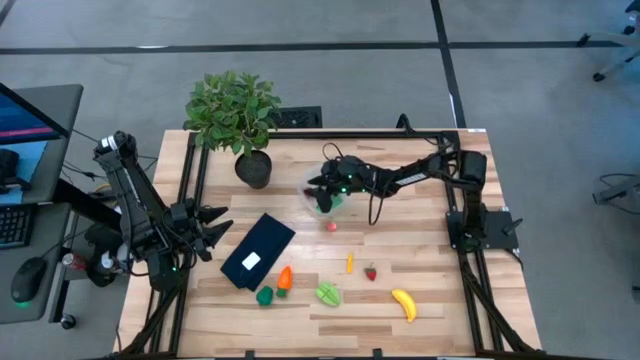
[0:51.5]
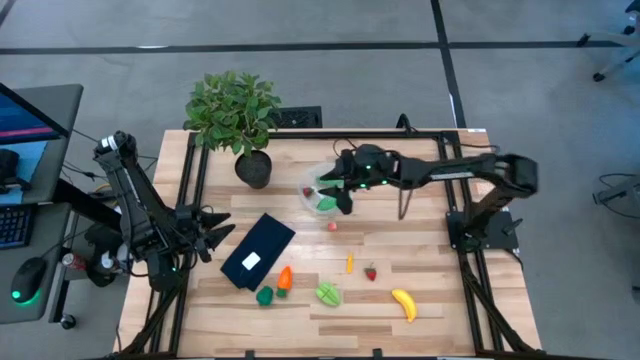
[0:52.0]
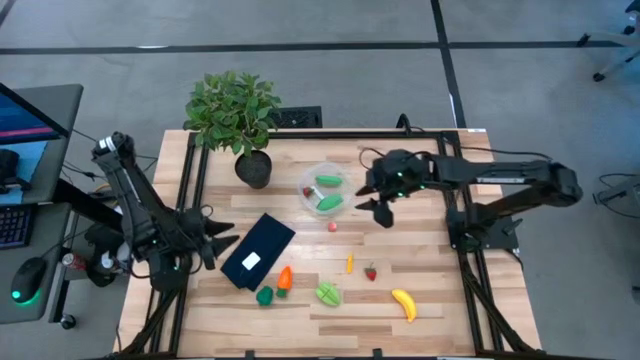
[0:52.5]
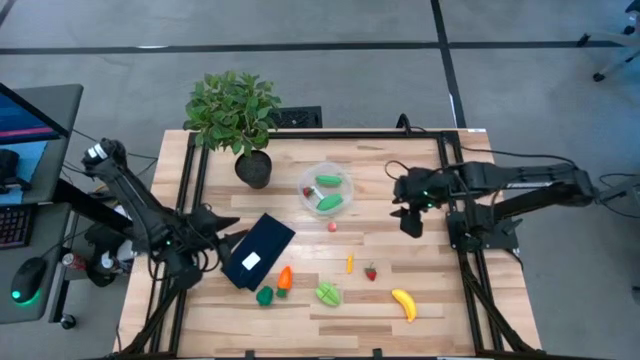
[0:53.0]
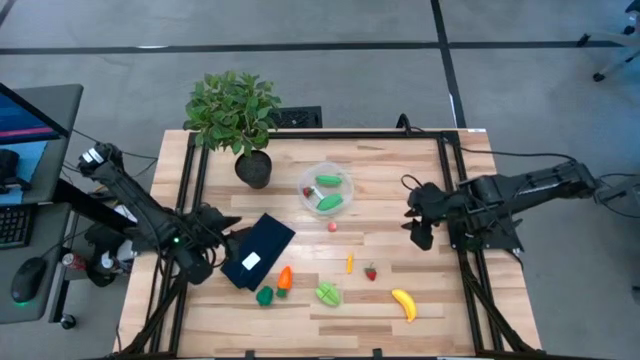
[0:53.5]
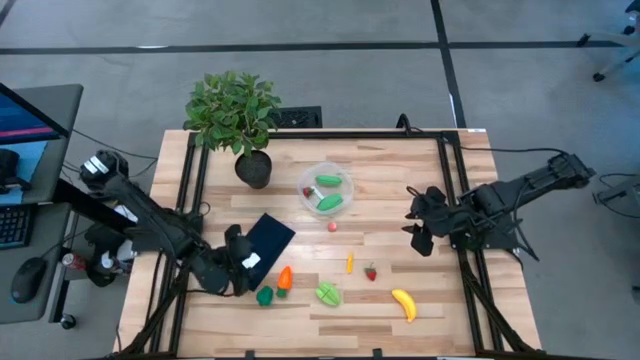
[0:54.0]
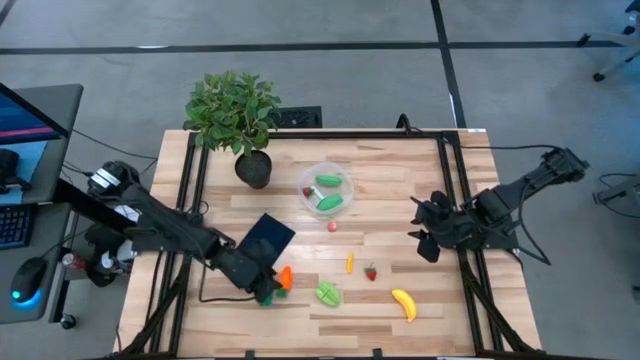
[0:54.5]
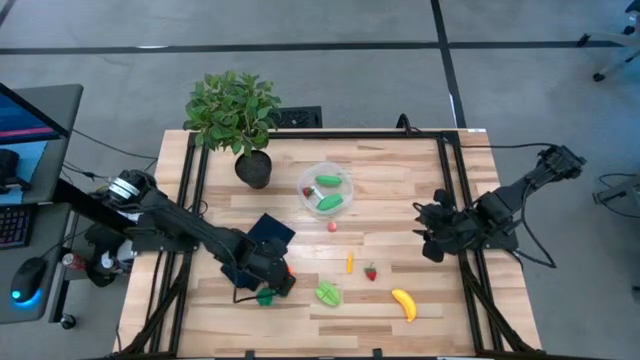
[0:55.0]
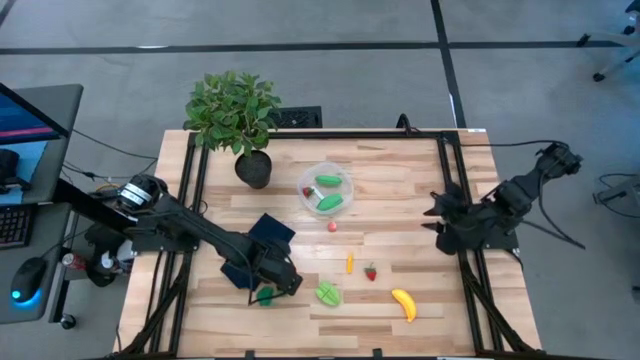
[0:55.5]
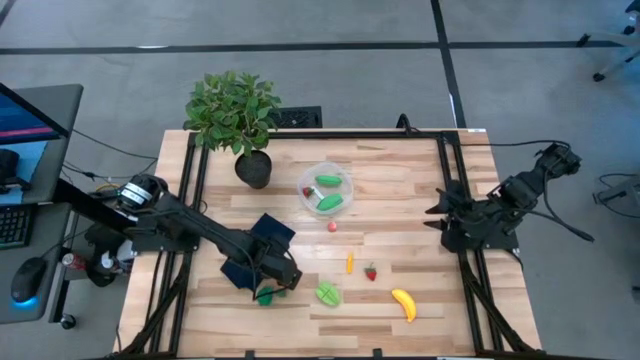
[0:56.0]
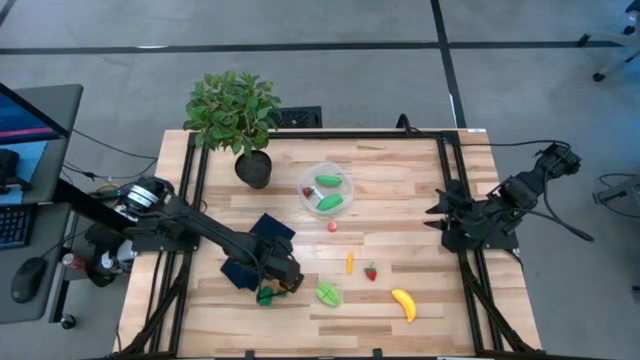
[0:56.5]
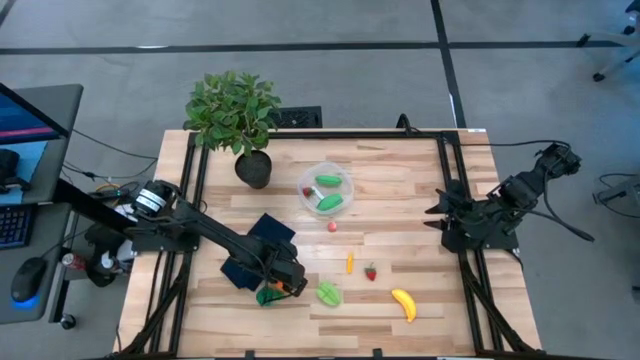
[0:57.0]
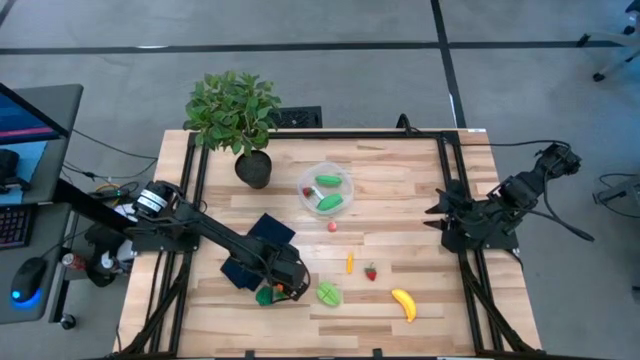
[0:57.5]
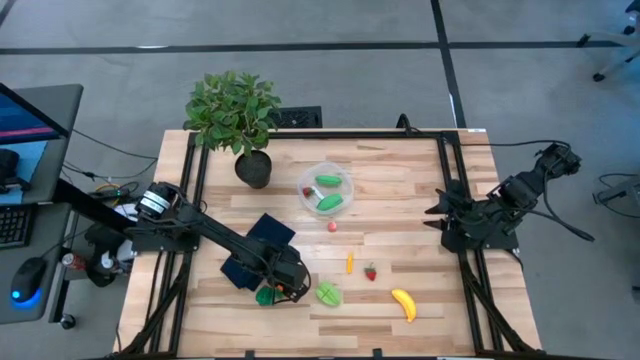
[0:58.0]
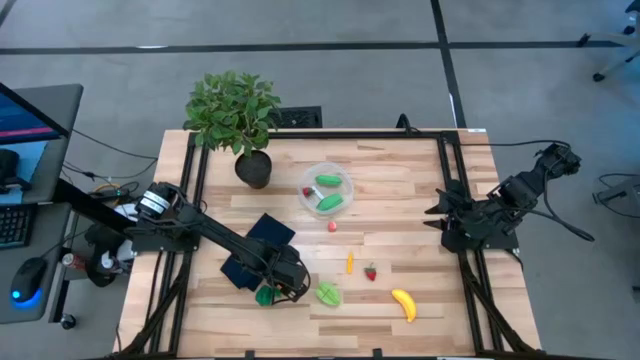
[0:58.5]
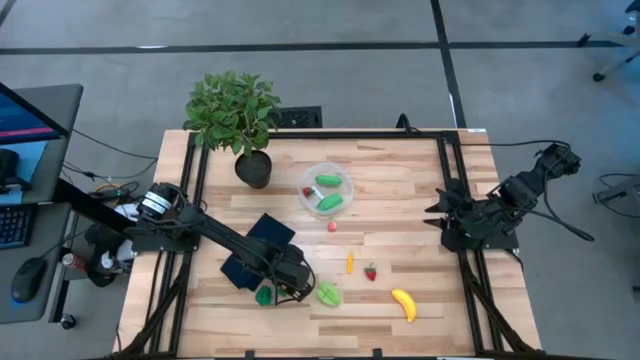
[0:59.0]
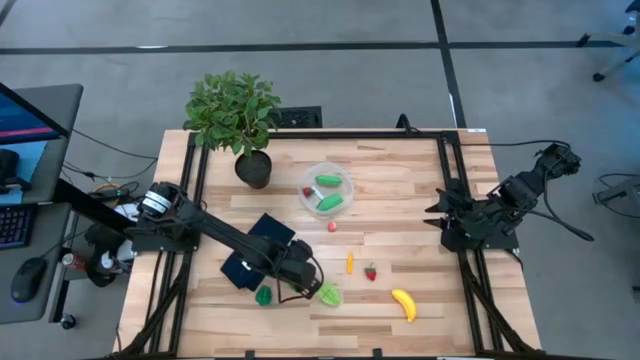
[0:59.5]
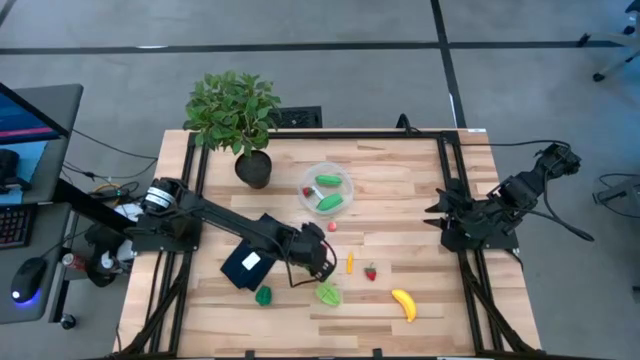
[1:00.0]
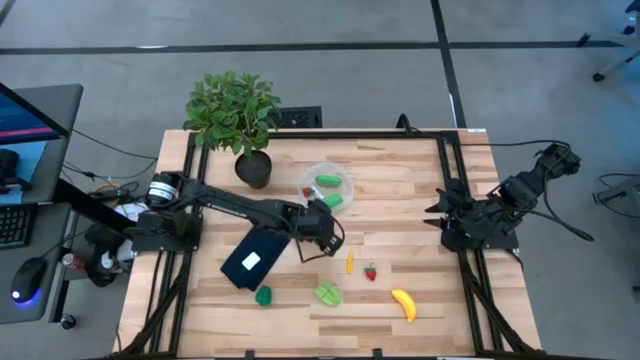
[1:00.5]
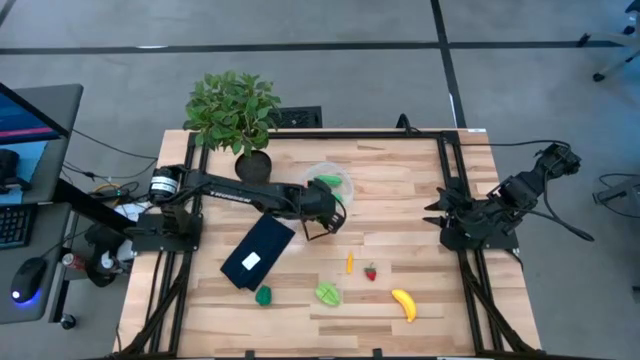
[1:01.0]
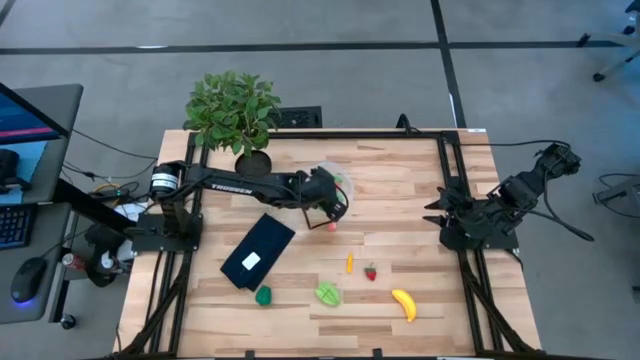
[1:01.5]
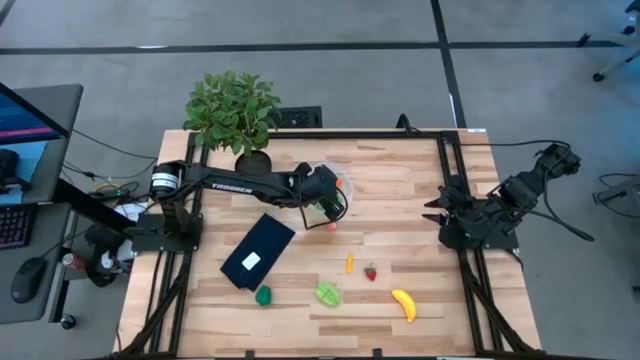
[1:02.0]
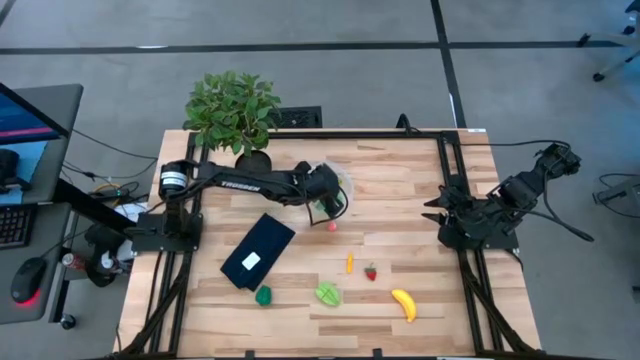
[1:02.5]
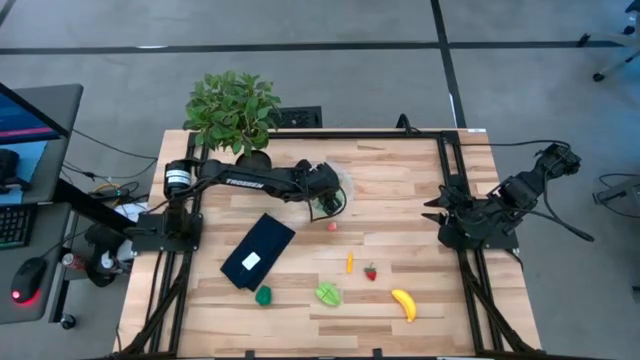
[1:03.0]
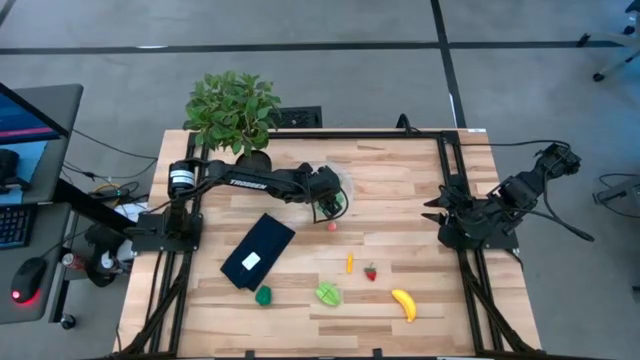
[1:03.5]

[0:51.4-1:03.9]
Task: Pick and placing Produce into tupperware
Put the orange carrot into the transparent bin

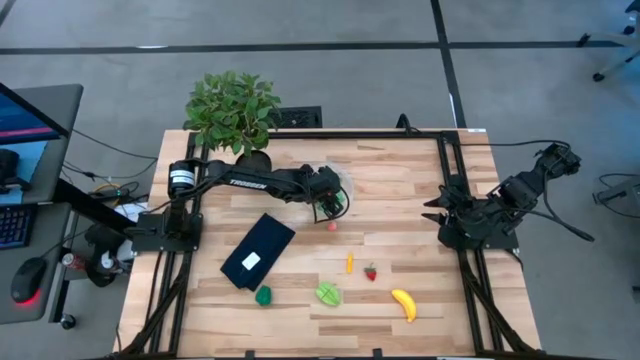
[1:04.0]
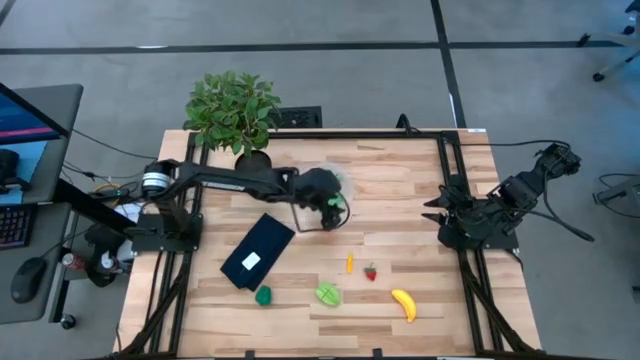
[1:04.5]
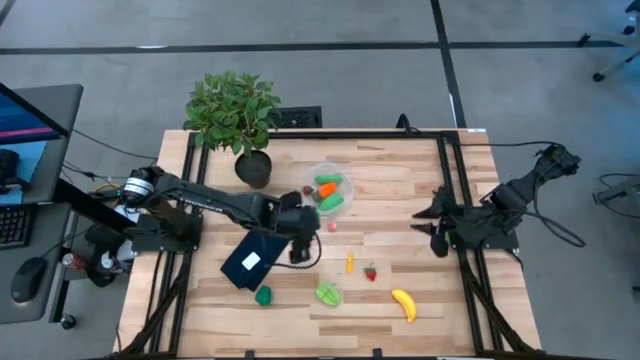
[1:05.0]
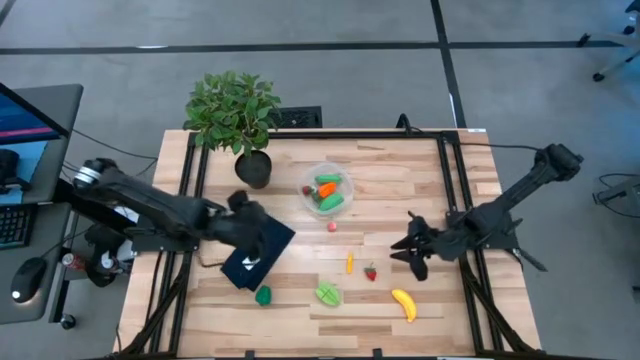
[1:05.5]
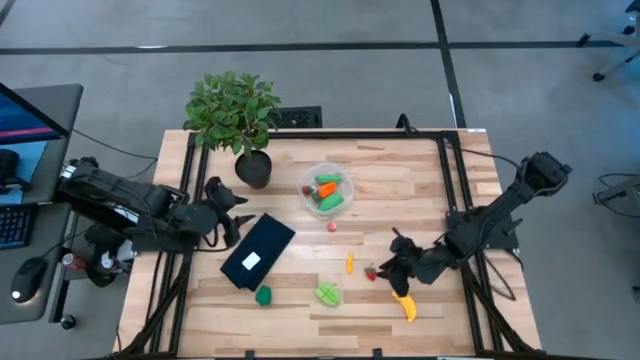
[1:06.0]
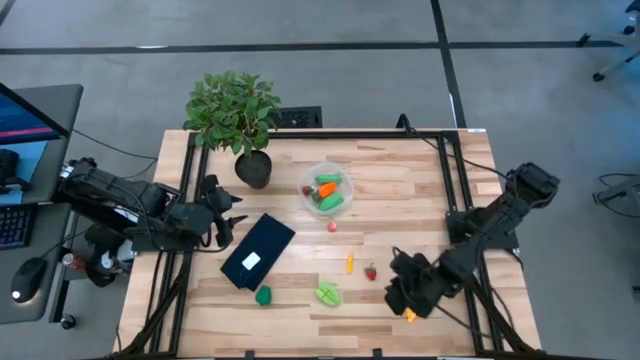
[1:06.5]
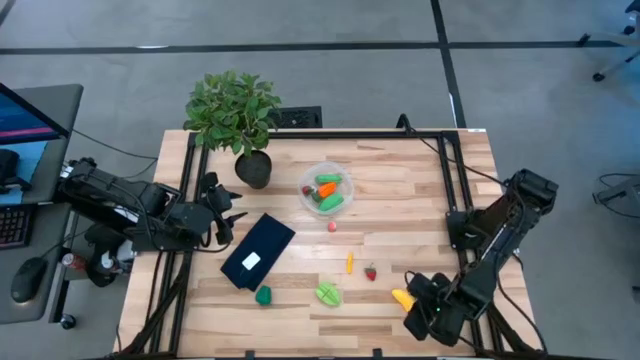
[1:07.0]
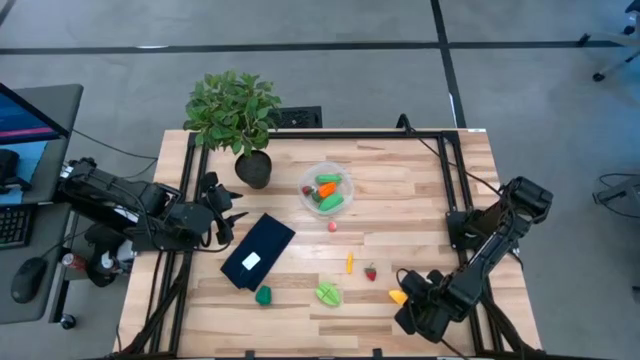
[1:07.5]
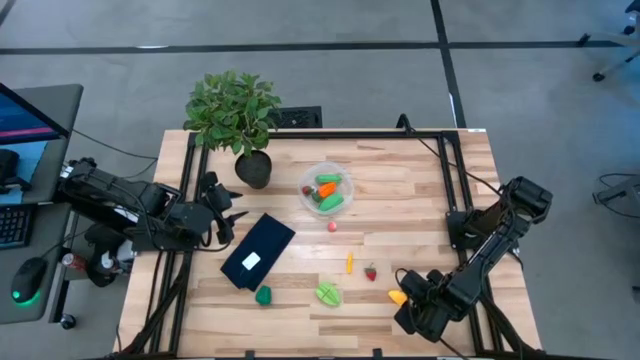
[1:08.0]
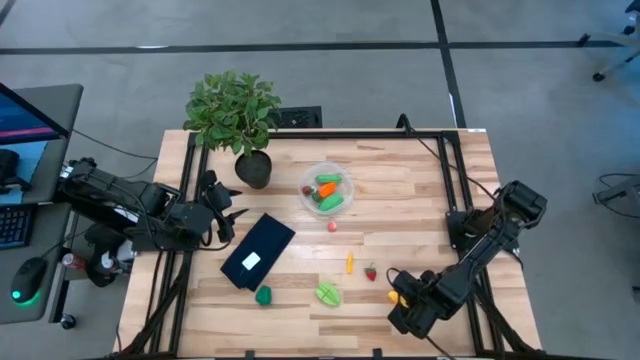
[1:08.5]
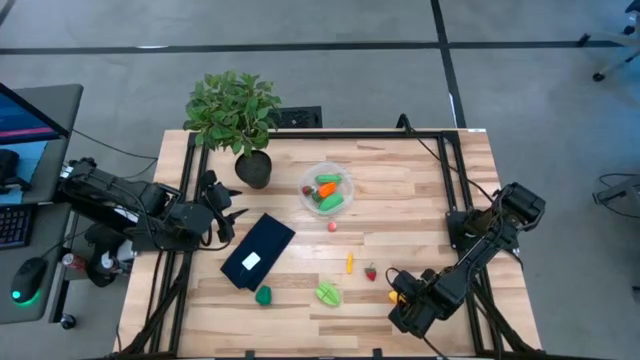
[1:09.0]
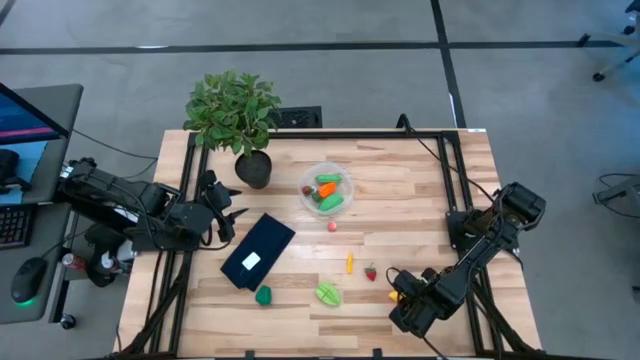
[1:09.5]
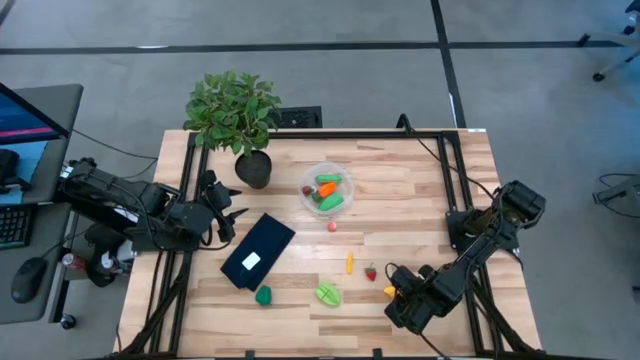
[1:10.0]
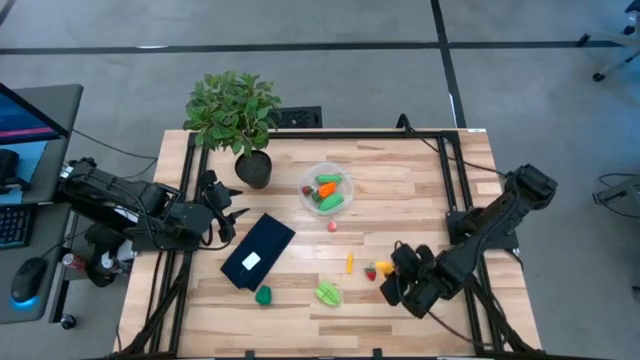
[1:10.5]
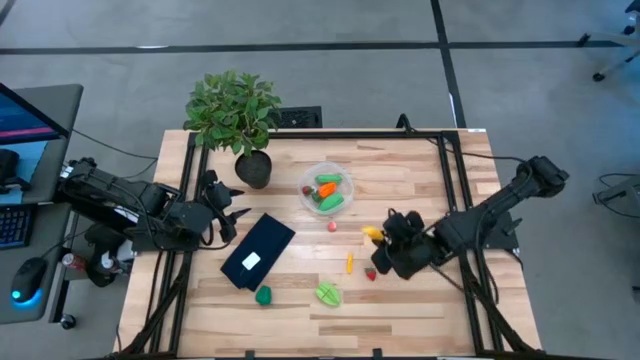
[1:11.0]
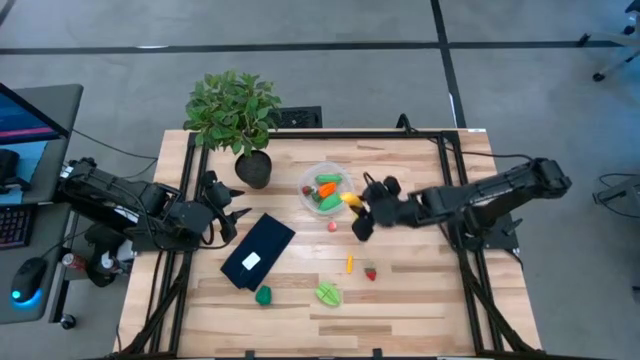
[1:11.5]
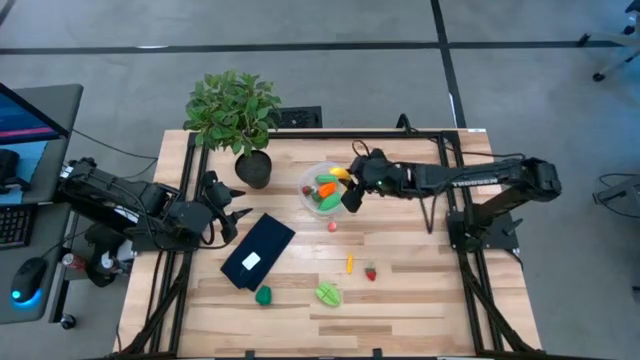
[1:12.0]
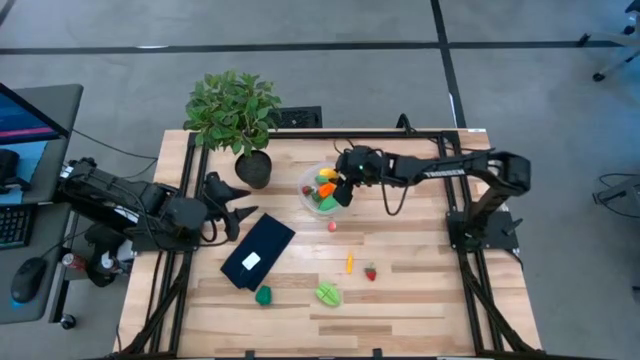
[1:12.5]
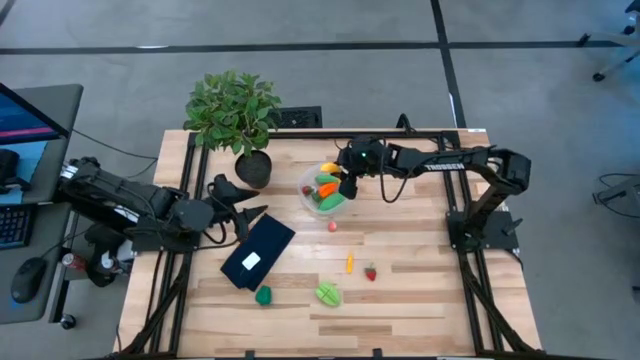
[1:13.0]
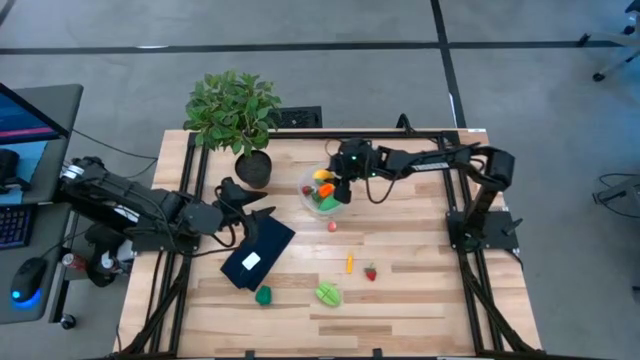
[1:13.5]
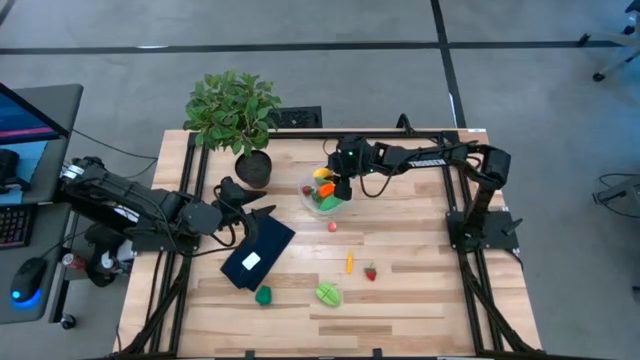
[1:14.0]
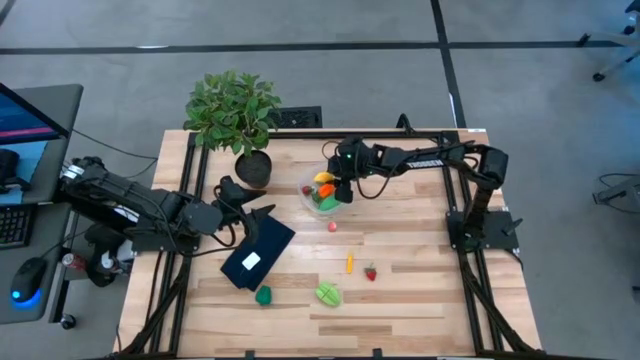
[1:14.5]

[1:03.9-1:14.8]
Put the yellow banana into the transparent bin
